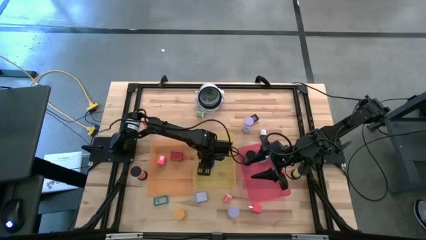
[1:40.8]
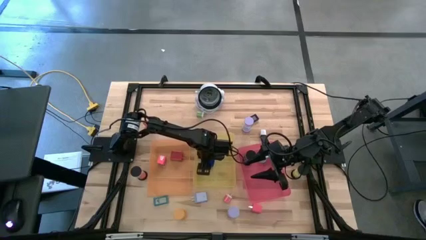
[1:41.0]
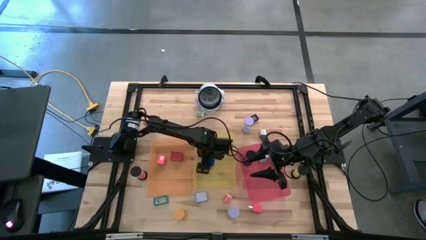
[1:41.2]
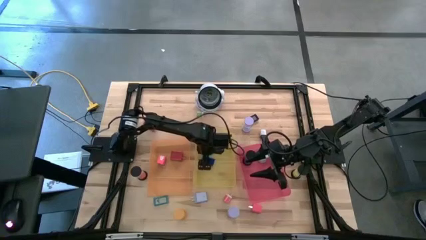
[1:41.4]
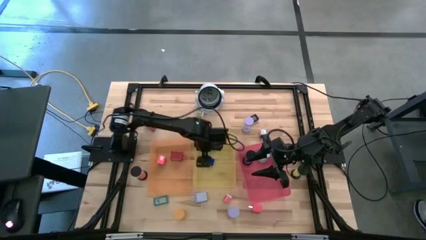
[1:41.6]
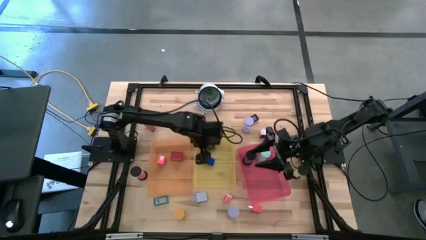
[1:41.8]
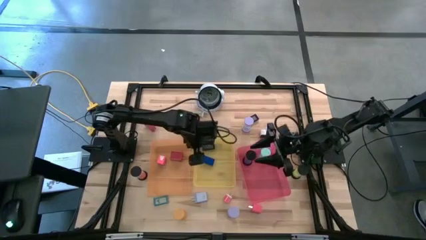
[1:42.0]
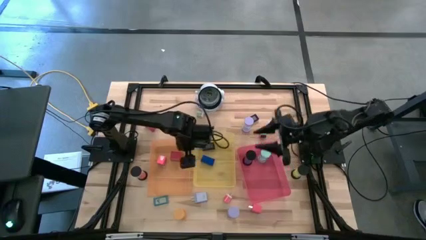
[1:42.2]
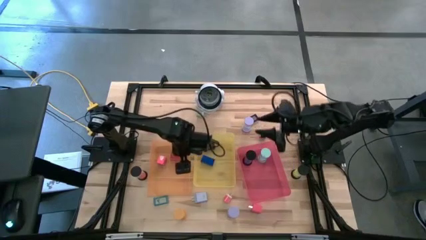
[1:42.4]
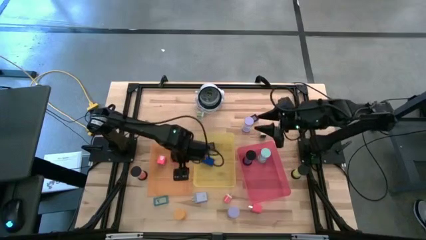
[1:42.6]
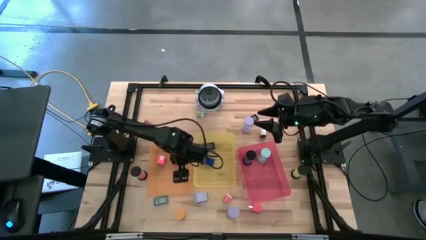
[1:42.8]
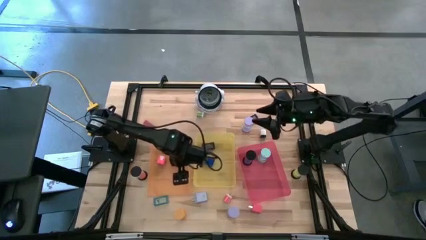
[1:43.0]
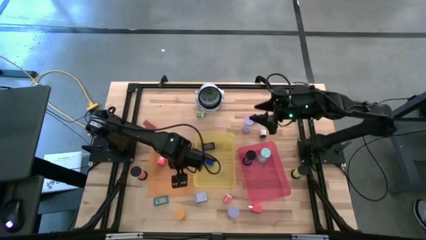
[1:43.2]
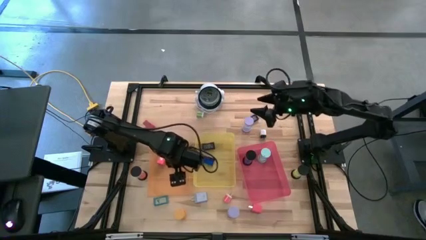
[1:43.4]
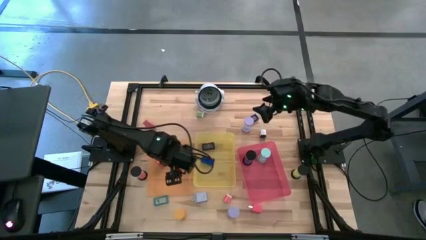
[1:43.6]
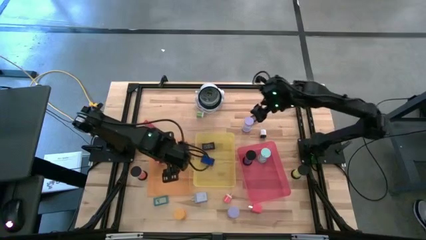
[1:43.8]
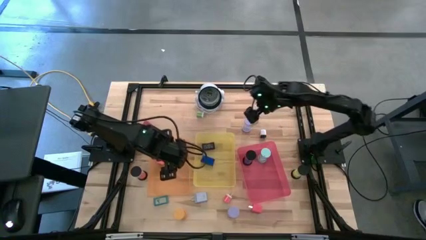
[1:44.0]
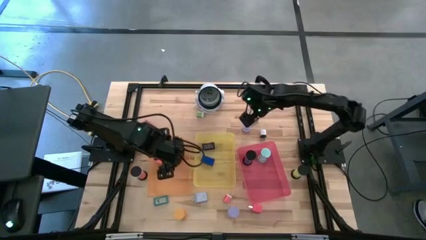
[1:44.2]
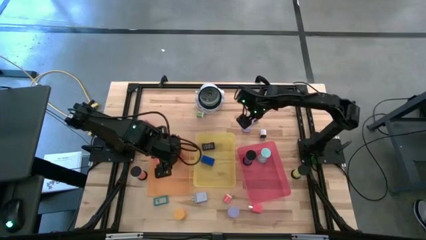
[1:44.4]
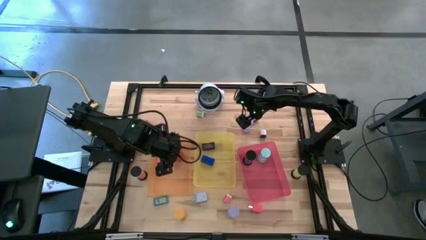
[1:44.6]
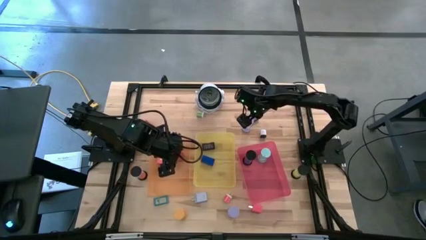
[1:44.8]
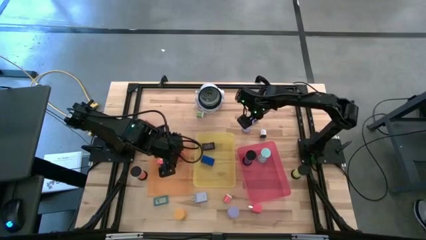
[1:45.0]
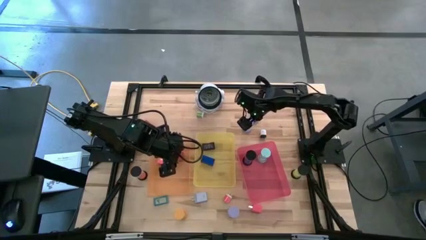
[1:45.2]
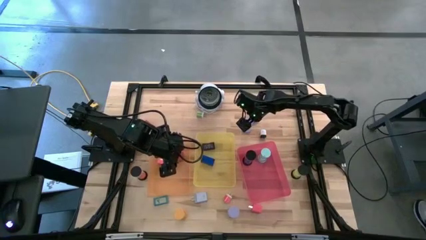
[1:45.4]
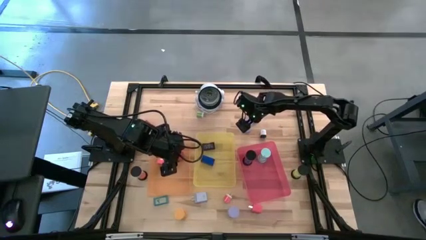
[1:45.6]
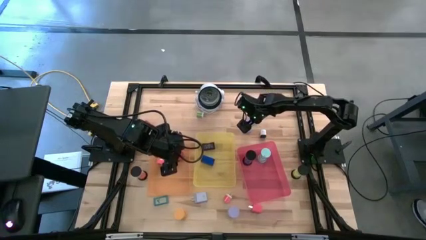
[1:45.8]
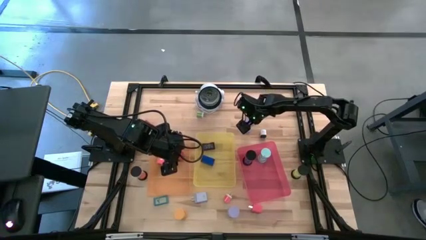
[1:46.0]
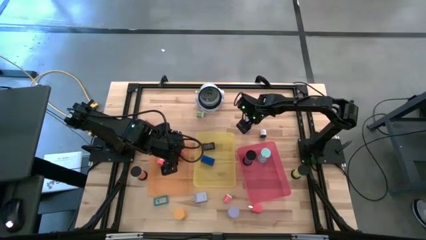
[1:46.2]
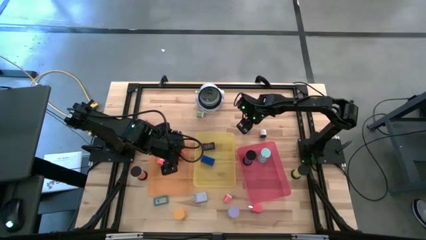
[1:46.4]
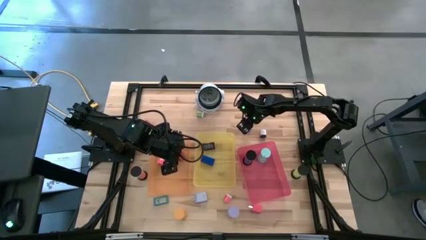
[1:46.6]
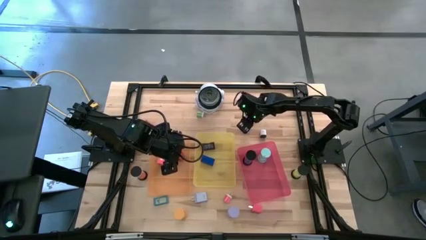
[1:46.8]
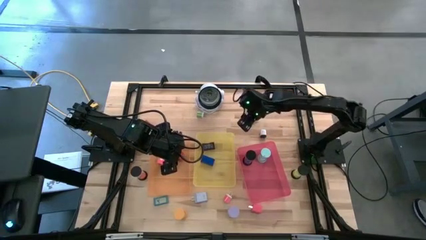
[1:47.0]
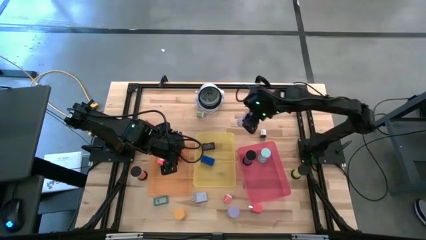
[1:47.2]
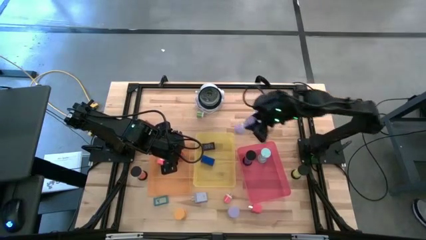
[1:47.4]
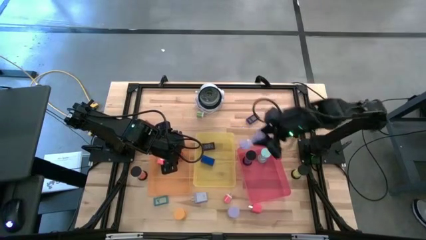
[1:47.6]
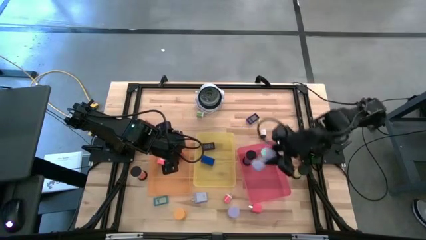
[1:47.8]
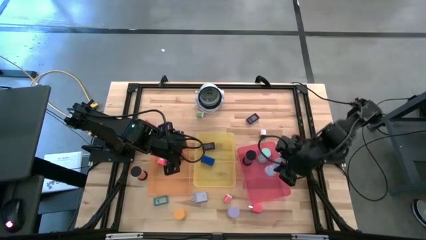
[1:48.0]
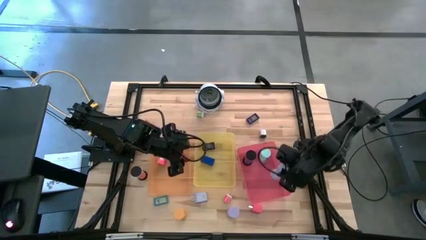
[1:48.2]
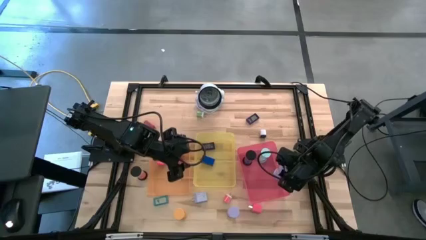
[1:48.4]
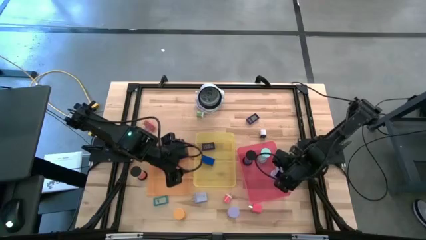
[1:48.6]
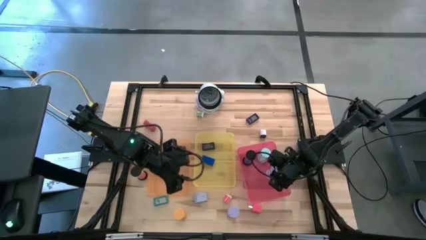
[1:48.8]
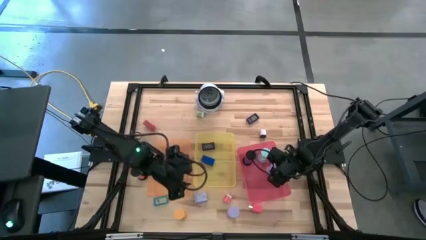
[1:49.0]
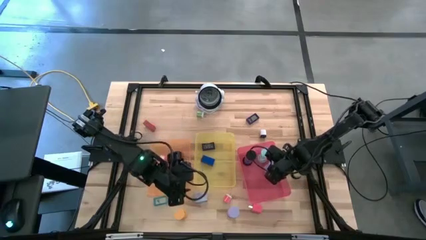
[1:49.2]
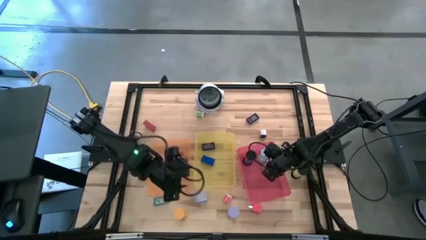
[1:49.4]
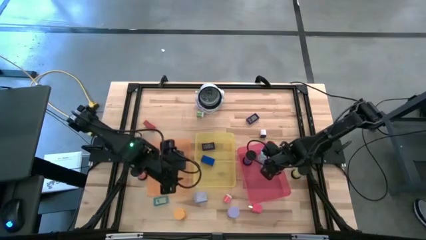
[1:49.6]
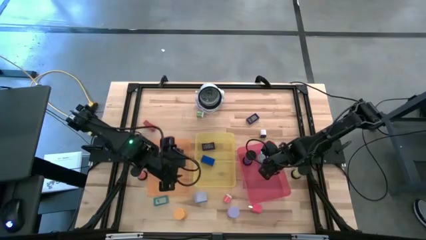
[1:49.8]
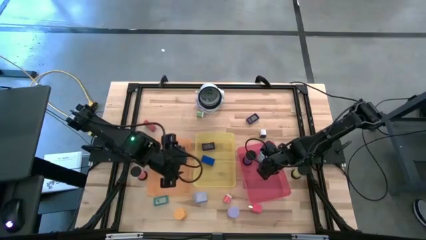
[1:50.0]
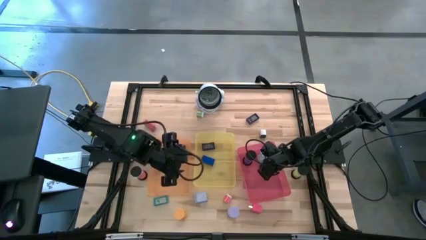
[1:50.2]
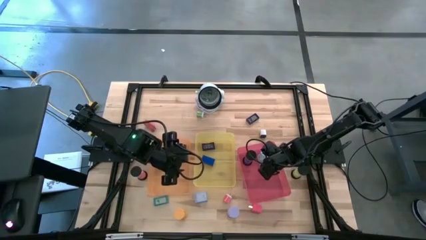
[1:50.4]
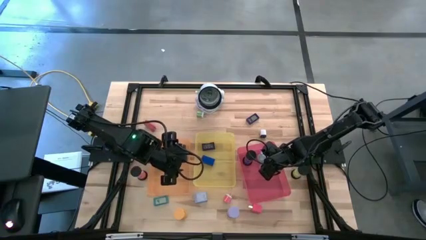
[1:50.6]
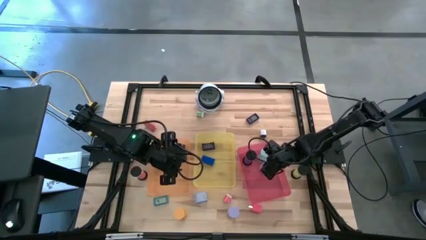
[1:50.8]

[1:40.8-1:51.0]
Task: Pick & Place Office items
Put the gray hourglass timer into the red bin
